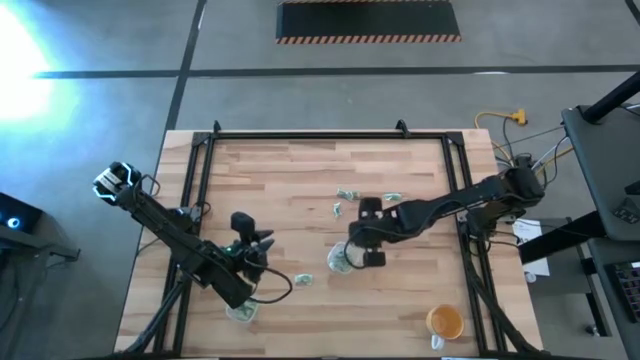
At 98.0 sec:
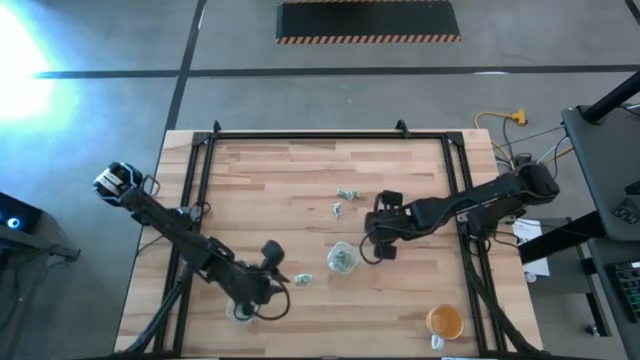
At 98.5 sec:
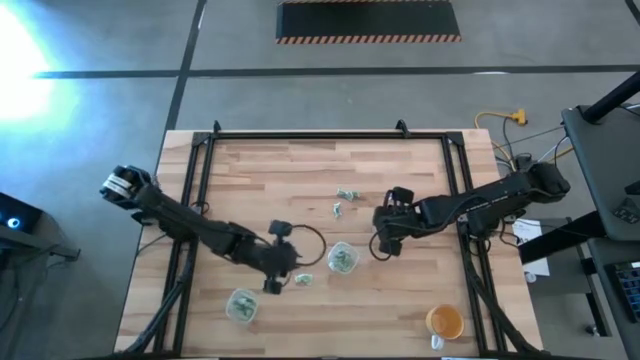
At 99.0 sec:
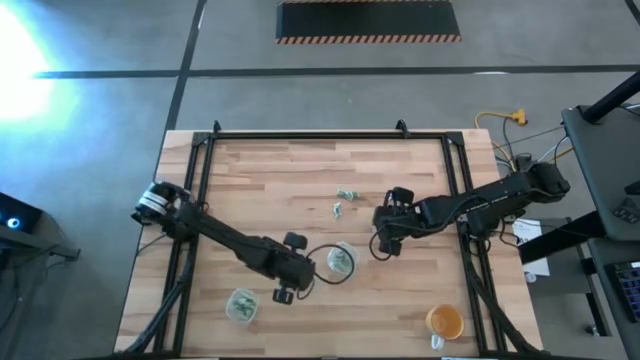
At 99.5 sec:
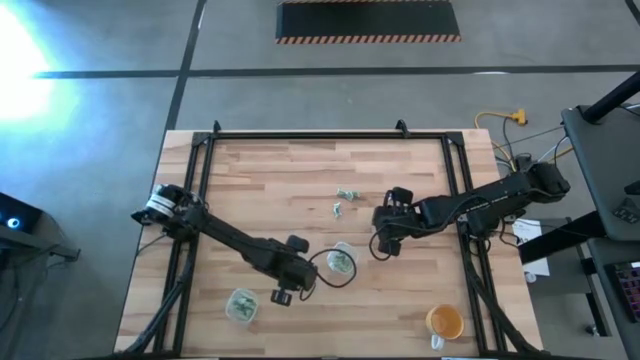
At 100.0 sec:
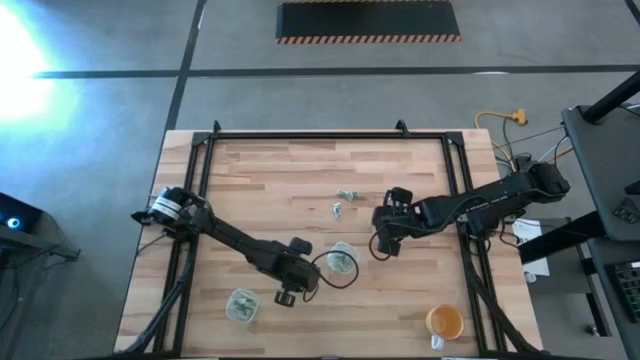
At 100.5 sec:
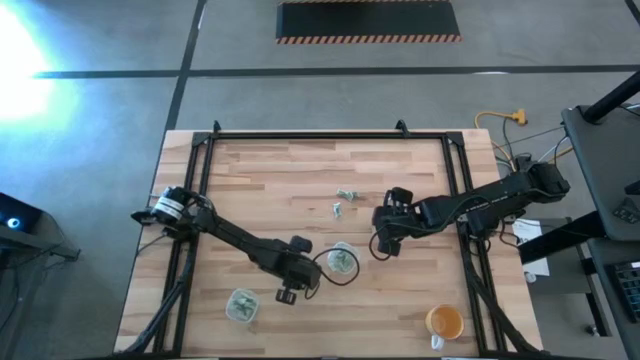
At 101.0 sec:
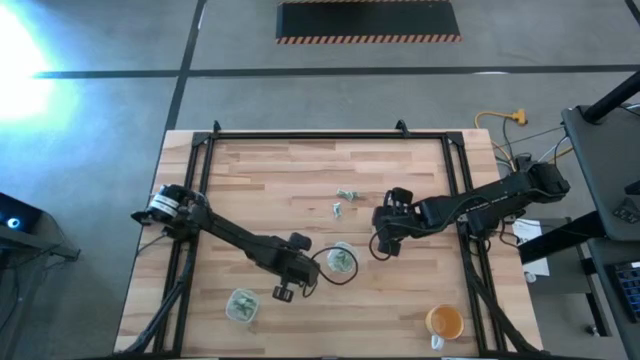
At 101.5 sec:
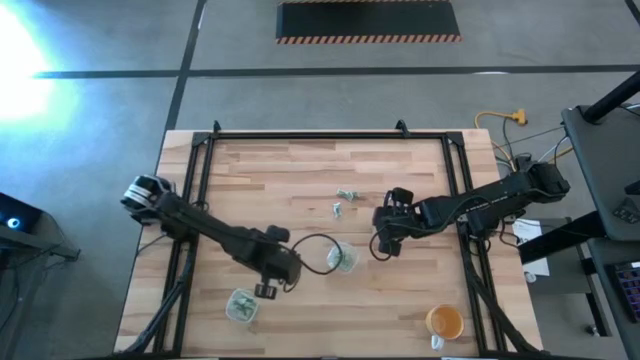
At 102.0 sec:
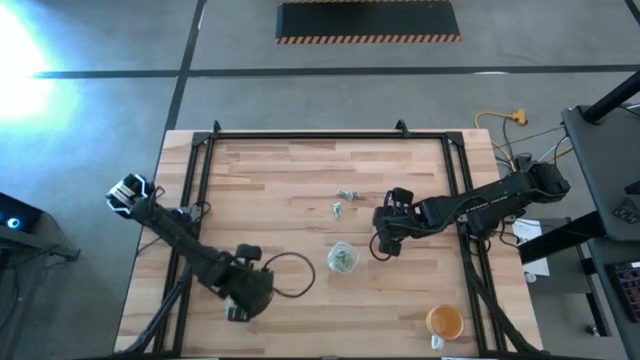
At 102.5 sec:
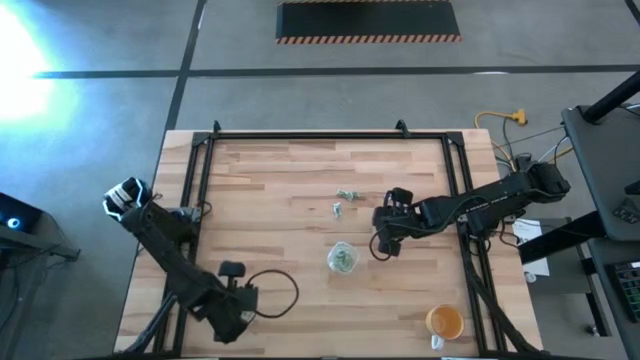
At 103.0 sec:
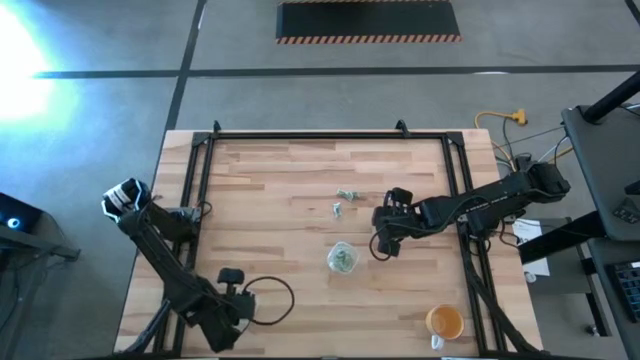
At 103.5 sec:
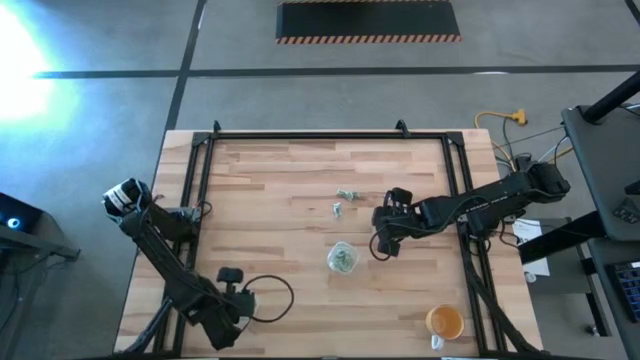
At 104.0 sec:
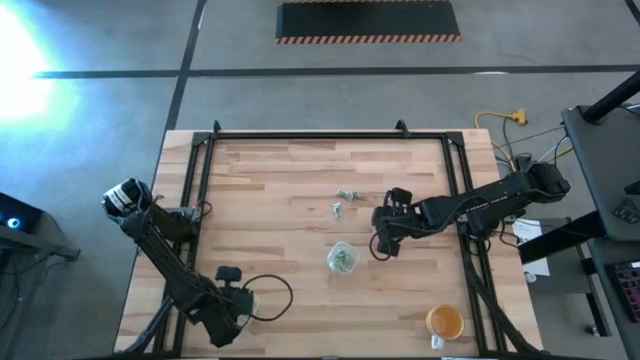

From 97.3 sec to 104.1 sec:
Task: Pick and place items into bin
Put the light green packet into the bottom transparent bin

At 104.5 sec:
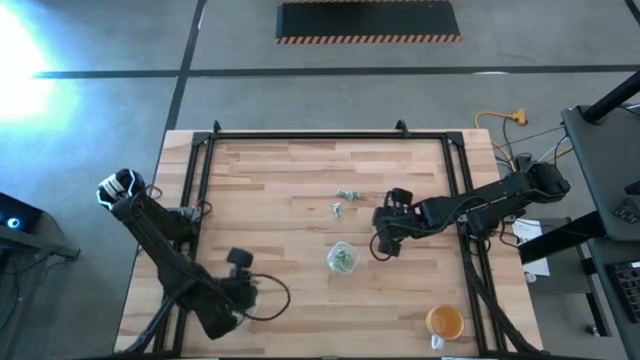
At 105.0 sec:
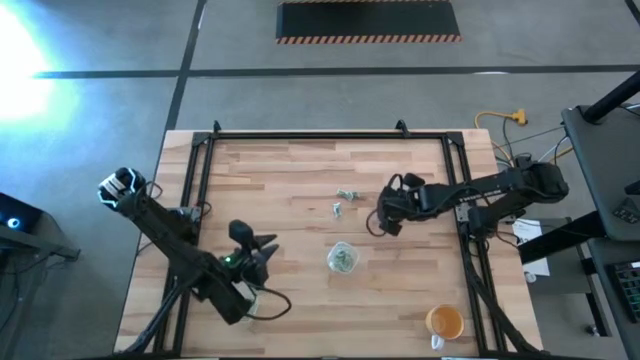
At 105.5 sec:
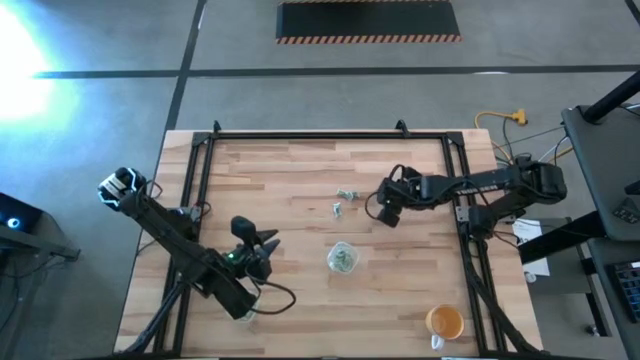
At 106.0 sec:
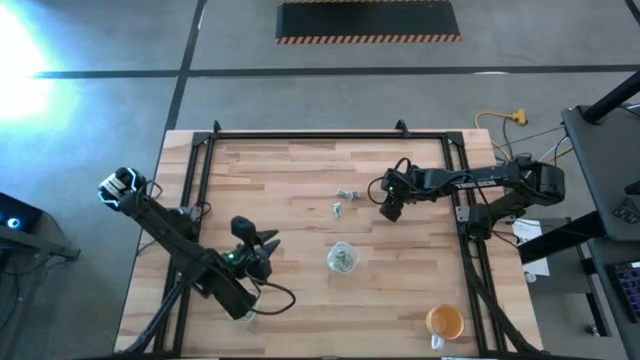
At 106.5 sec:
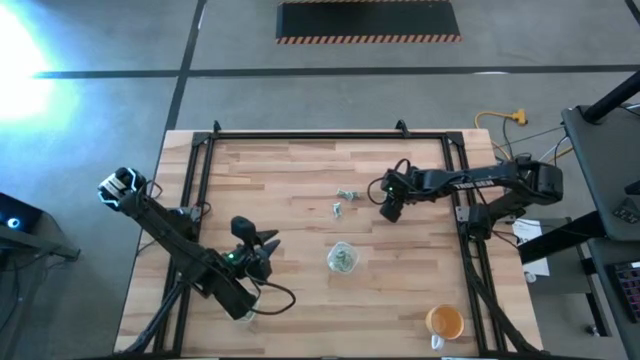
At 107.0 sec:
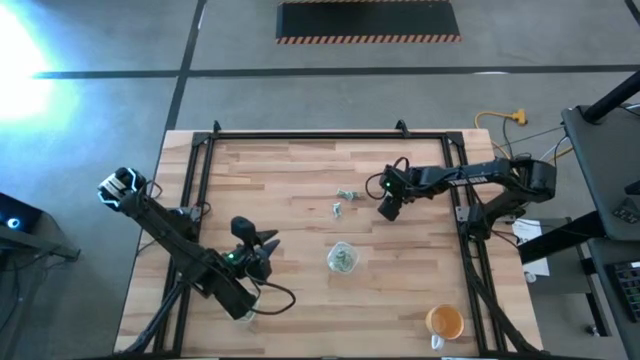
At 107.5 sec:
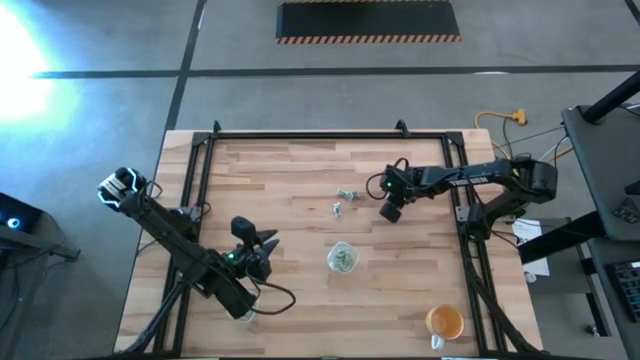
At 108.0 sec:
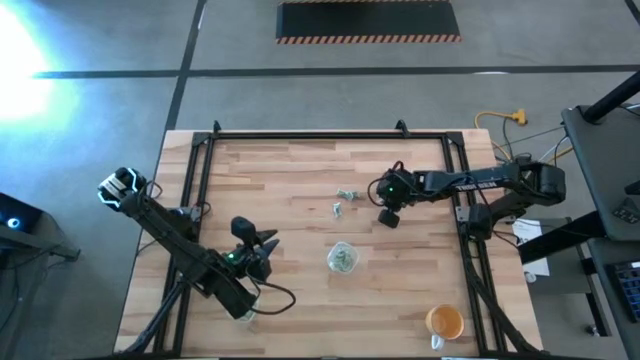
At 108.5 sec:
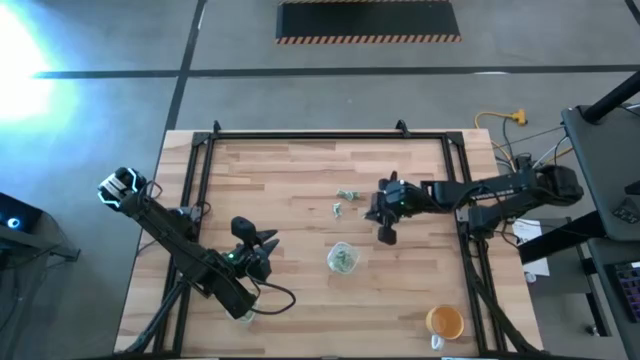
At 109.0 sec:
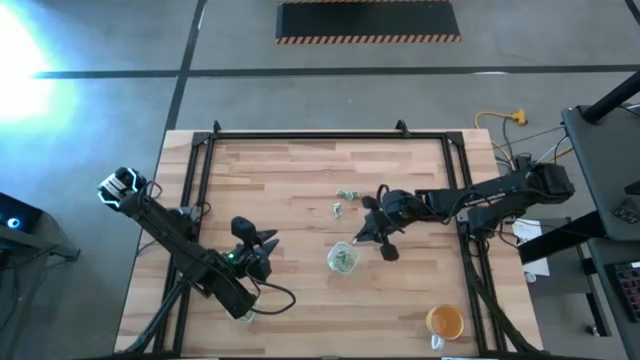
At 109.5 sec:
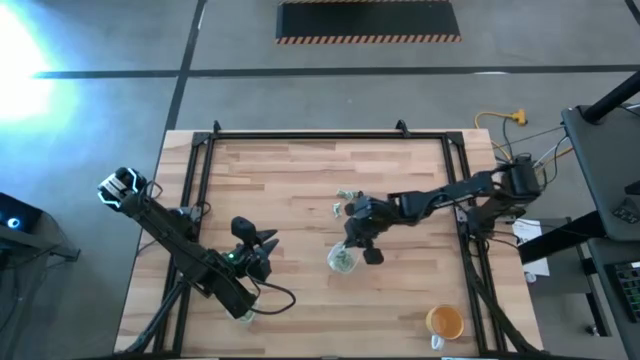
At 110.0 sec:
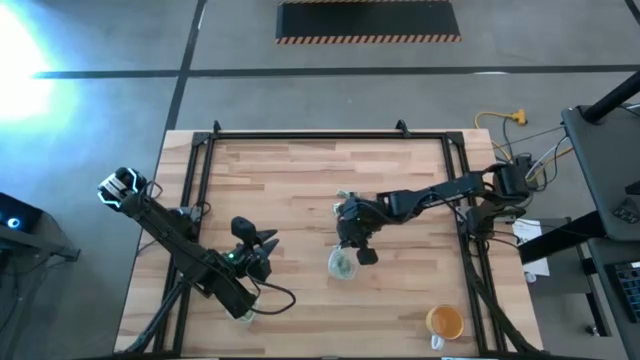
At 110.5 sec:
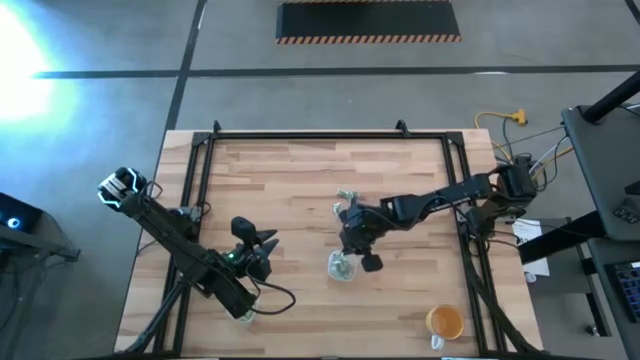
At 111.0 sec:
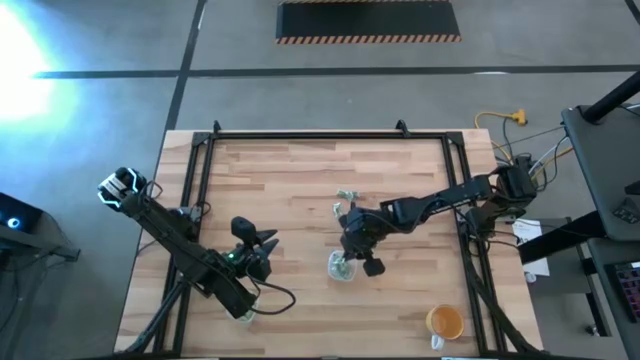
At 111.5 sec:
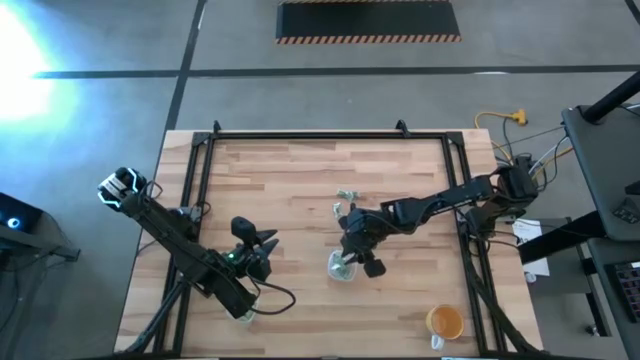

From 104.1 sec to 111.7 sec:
Put the light green packet into the top transparent bin

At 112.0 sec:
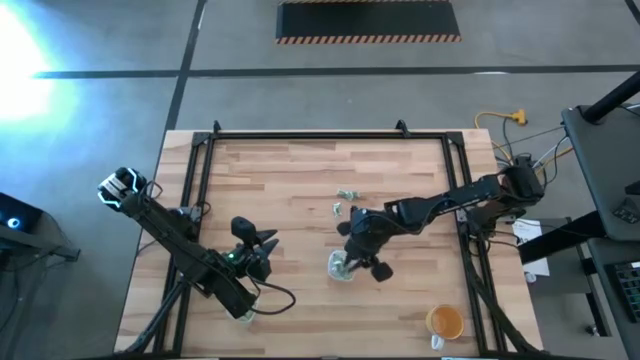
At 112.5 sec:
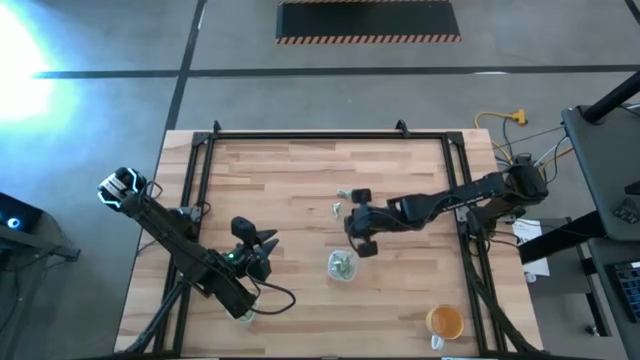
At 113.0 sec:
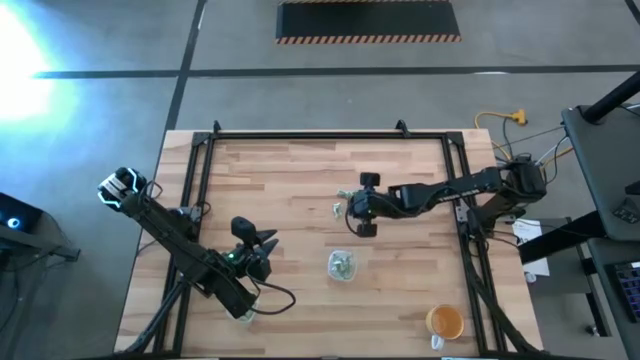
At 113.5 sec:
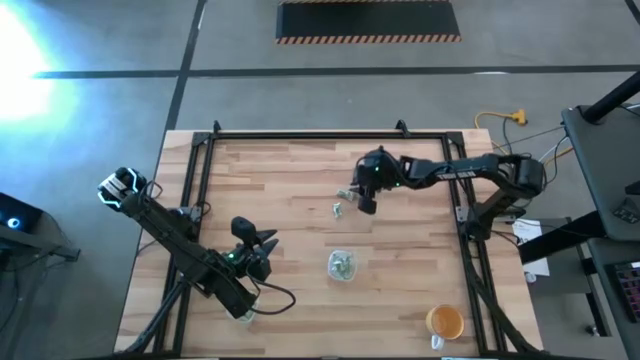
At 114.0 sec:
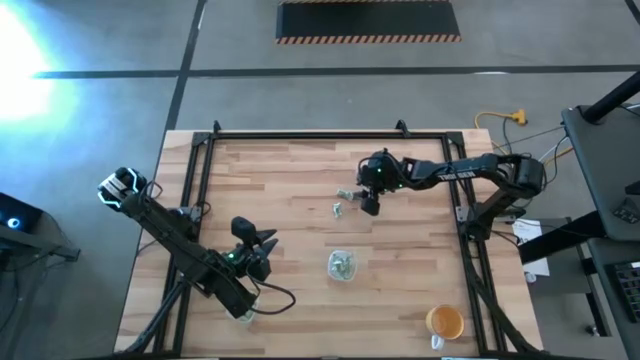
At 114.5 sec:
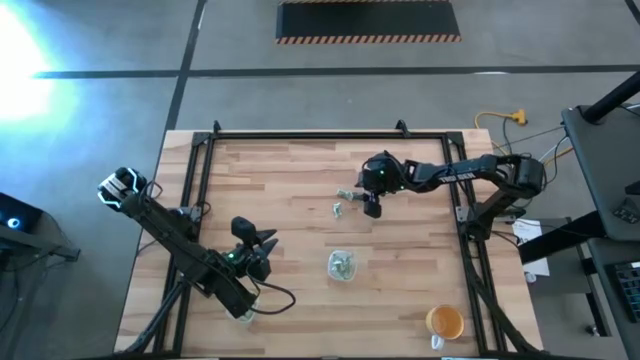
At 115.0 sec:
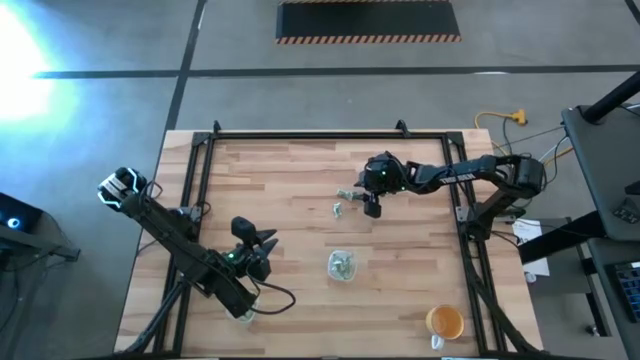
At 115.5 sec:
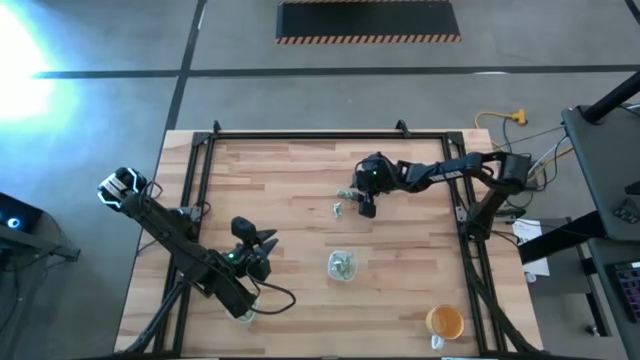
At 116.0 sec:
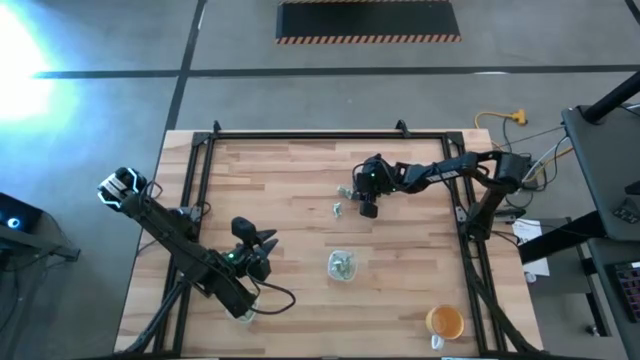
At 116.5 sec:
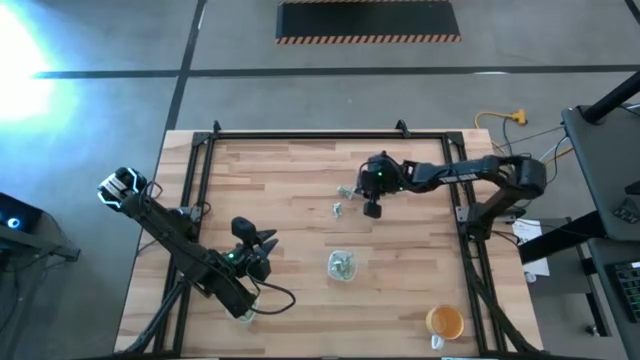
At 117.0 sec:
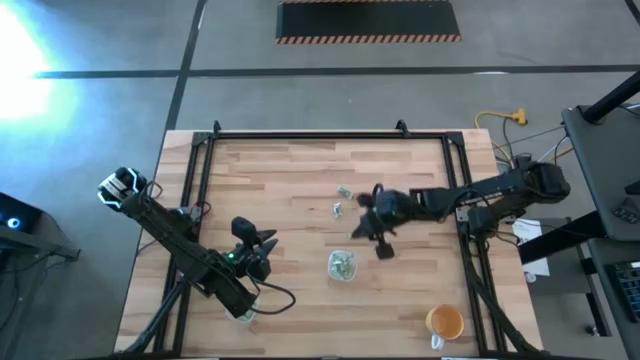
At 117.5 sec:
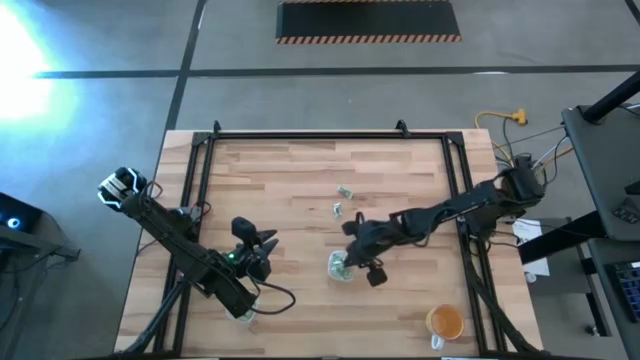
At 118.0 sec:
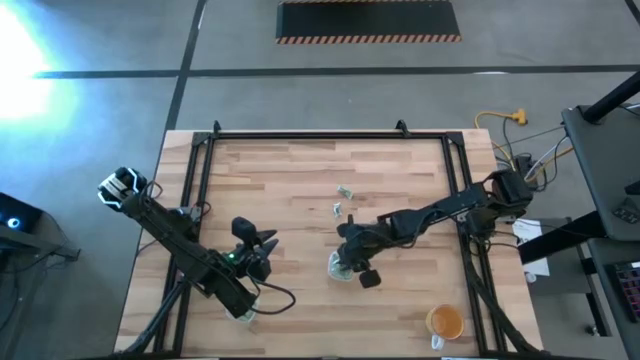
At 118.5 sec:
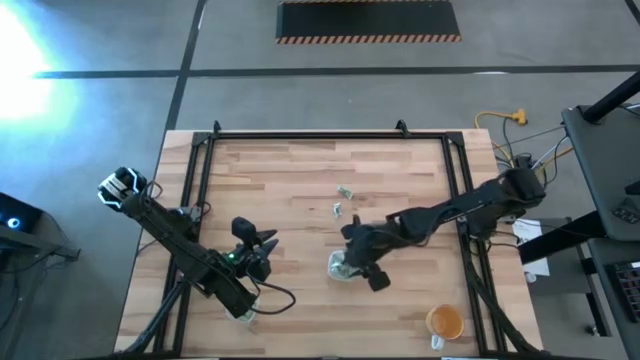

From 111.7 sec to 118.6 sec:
Put the light green packet into the top transparent bin
